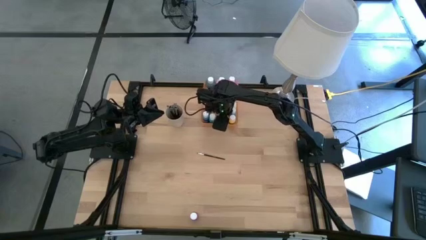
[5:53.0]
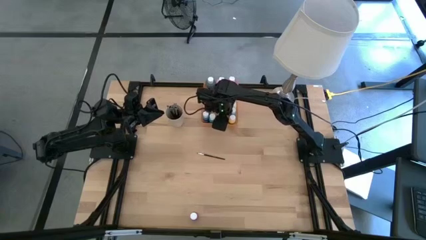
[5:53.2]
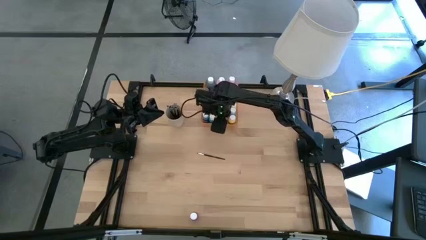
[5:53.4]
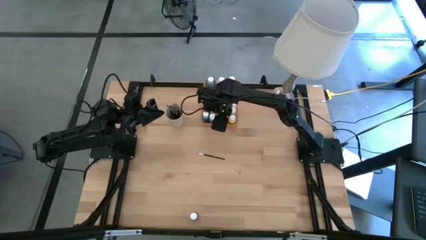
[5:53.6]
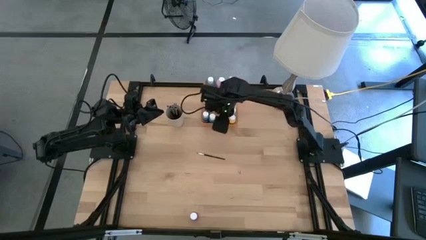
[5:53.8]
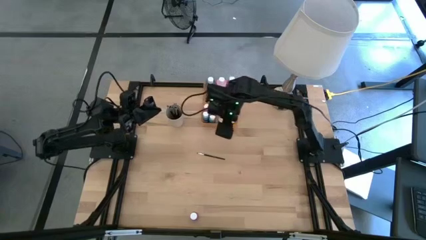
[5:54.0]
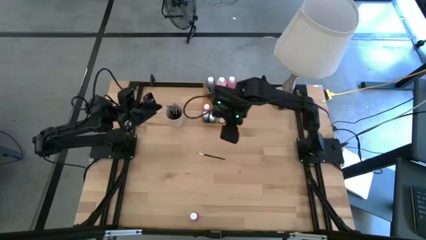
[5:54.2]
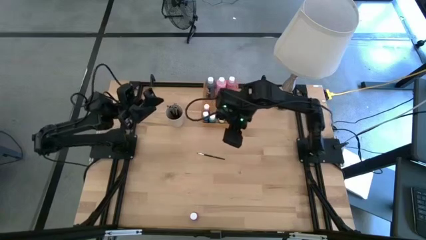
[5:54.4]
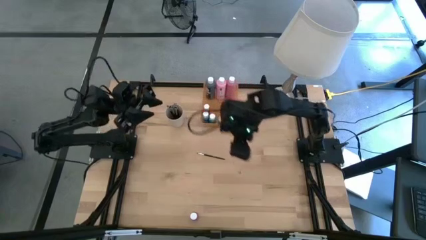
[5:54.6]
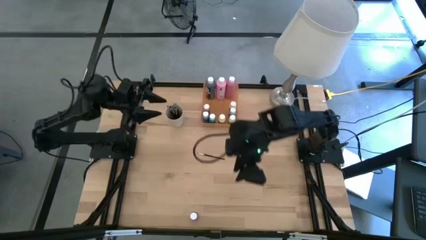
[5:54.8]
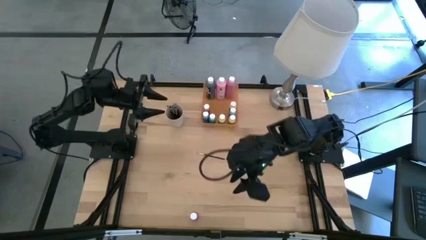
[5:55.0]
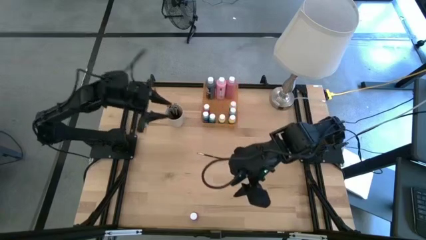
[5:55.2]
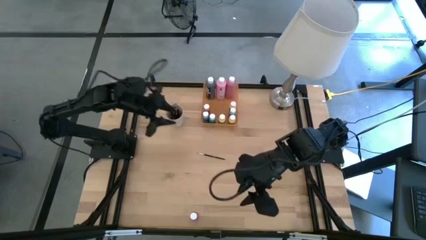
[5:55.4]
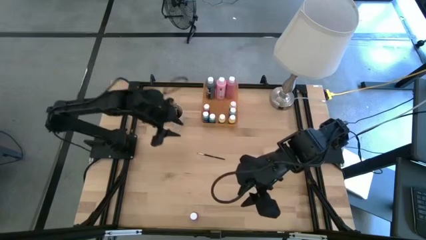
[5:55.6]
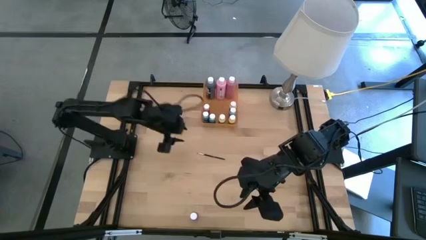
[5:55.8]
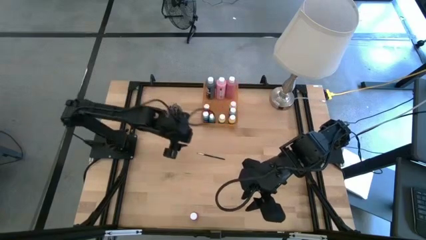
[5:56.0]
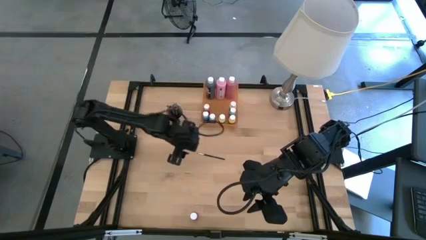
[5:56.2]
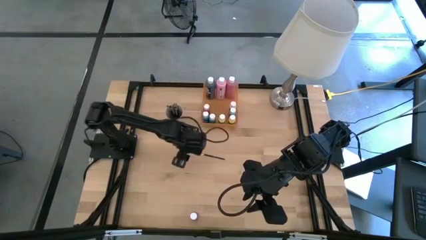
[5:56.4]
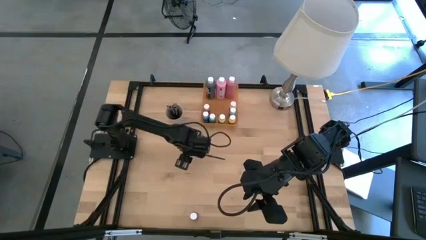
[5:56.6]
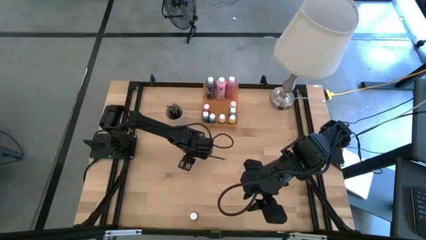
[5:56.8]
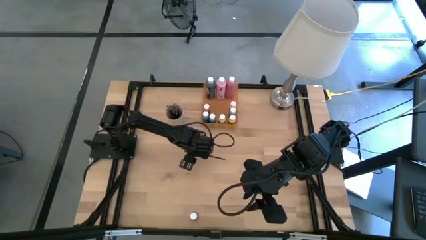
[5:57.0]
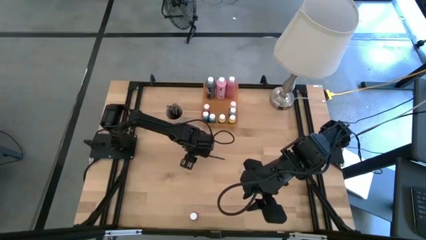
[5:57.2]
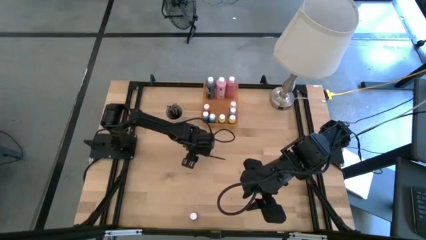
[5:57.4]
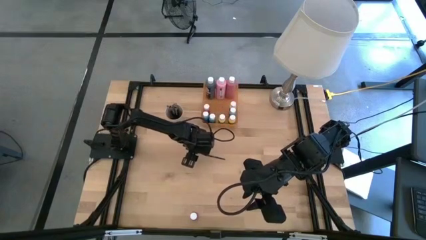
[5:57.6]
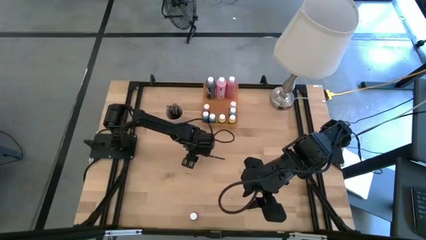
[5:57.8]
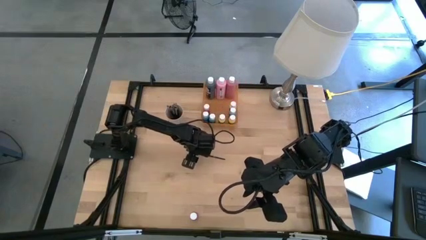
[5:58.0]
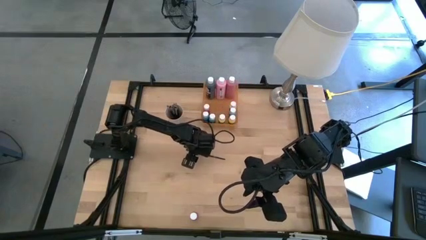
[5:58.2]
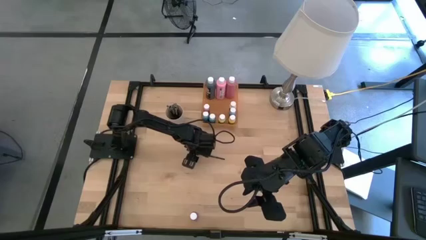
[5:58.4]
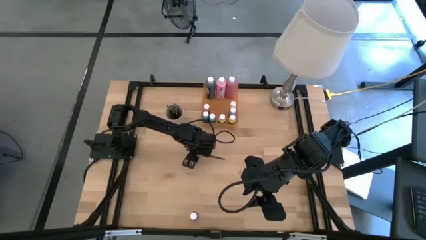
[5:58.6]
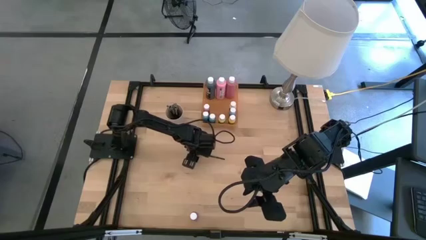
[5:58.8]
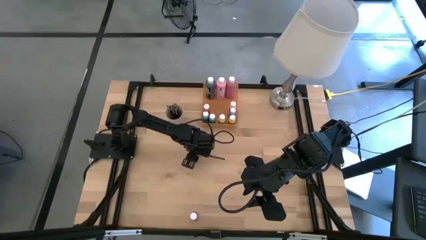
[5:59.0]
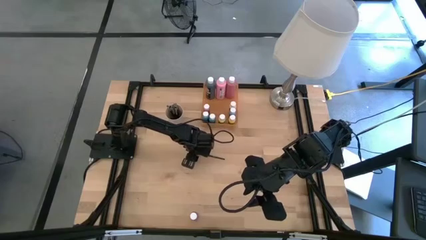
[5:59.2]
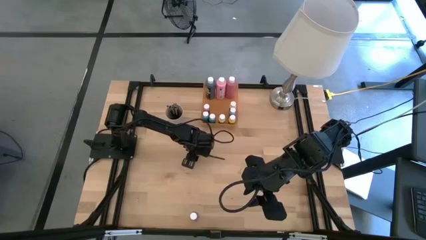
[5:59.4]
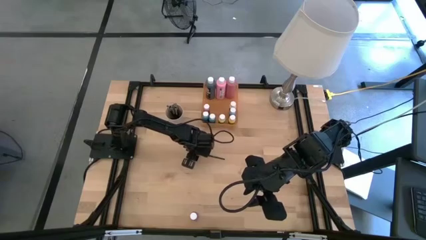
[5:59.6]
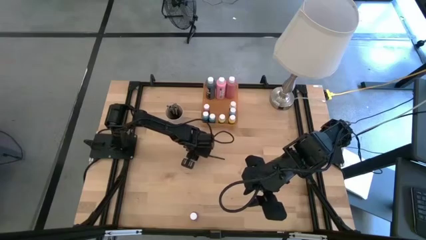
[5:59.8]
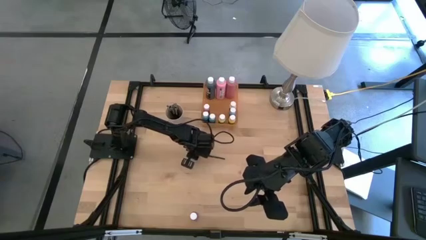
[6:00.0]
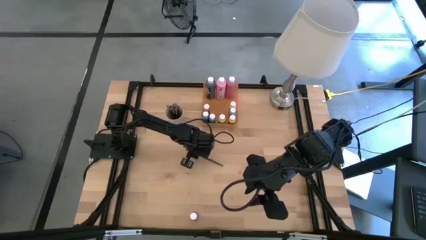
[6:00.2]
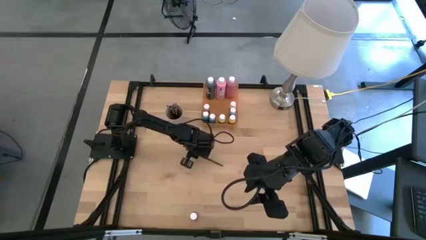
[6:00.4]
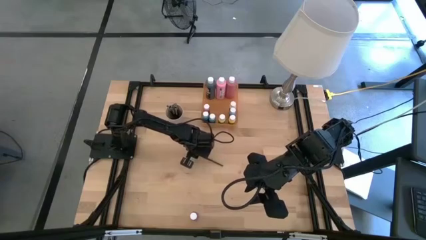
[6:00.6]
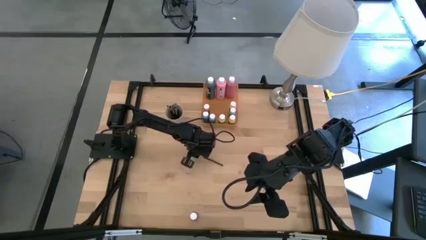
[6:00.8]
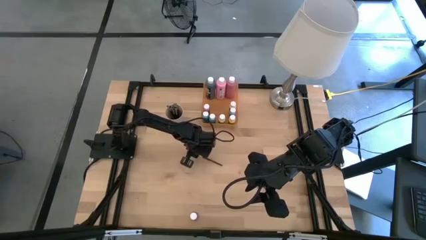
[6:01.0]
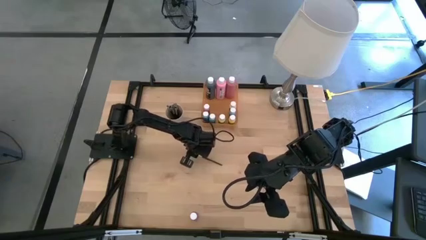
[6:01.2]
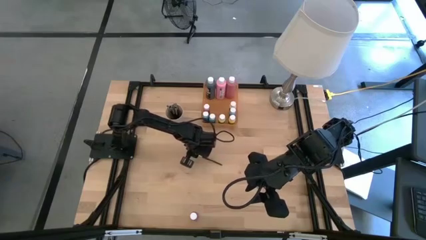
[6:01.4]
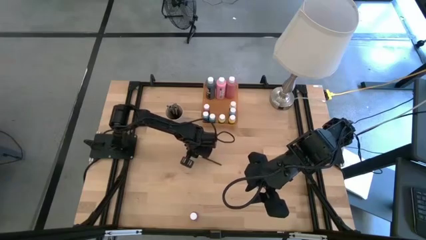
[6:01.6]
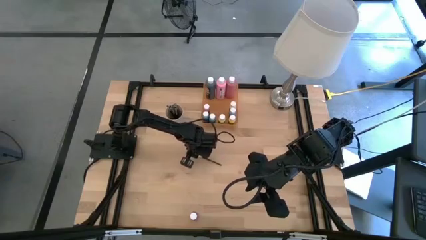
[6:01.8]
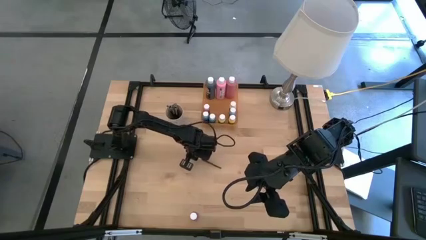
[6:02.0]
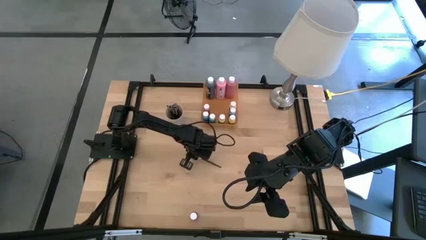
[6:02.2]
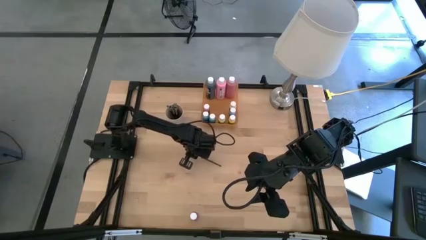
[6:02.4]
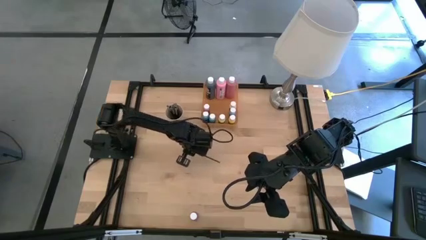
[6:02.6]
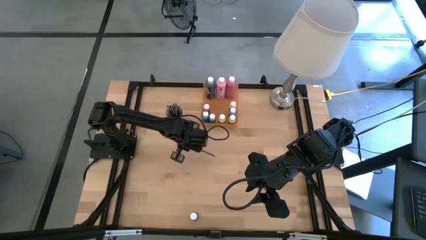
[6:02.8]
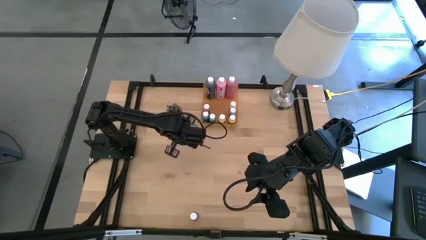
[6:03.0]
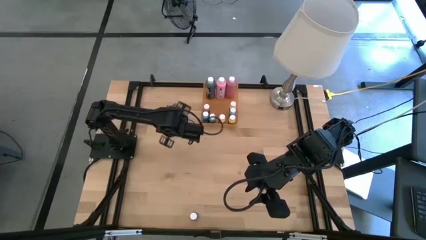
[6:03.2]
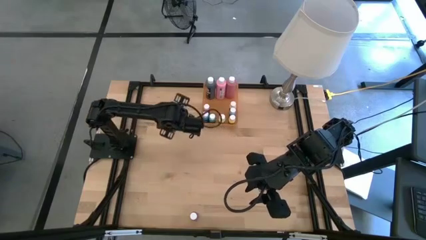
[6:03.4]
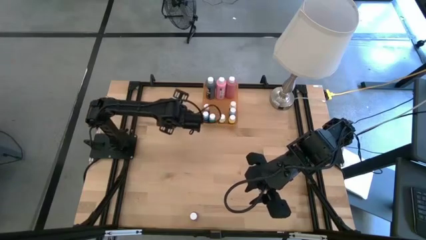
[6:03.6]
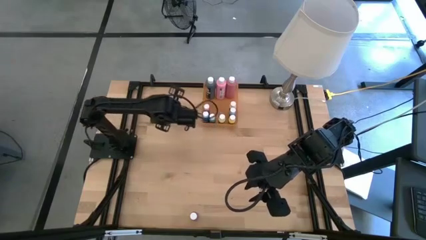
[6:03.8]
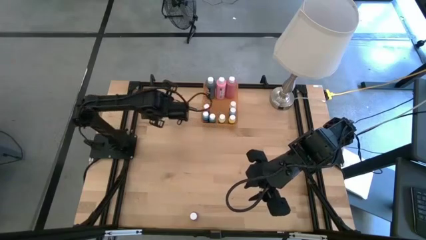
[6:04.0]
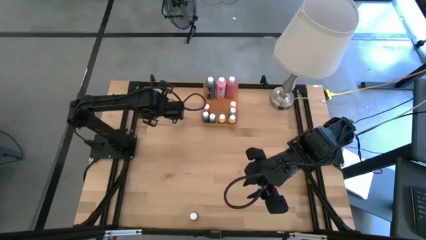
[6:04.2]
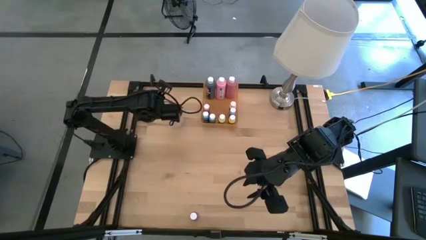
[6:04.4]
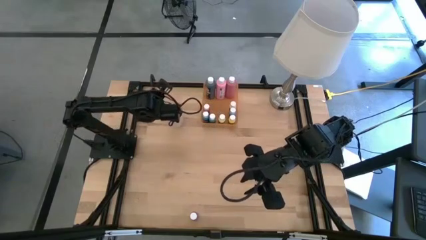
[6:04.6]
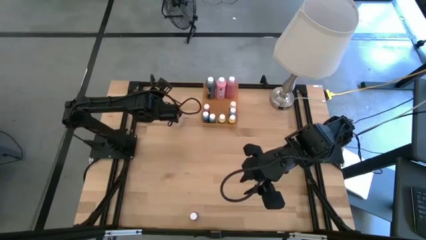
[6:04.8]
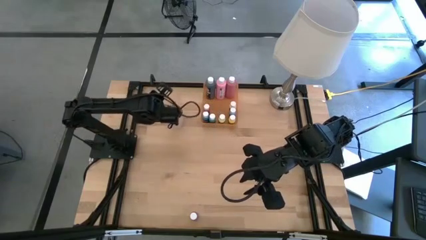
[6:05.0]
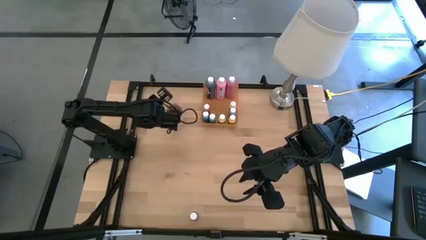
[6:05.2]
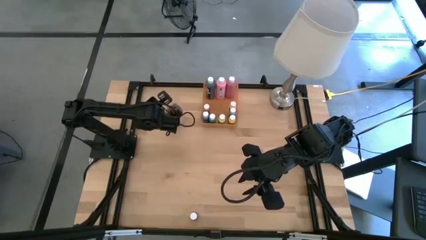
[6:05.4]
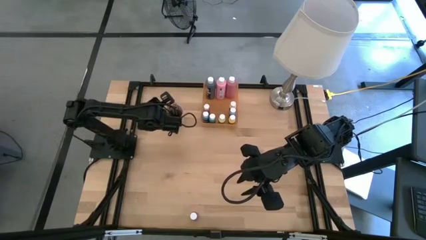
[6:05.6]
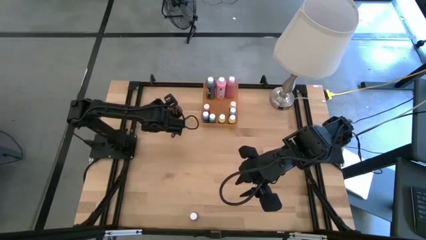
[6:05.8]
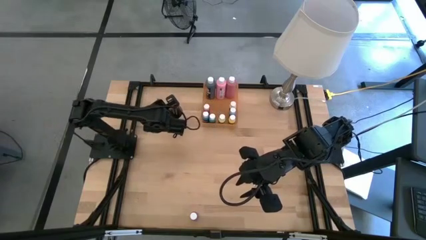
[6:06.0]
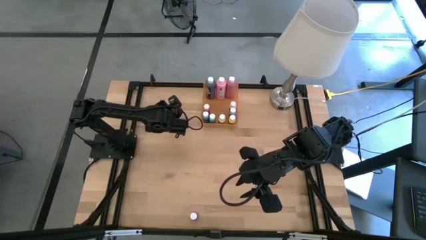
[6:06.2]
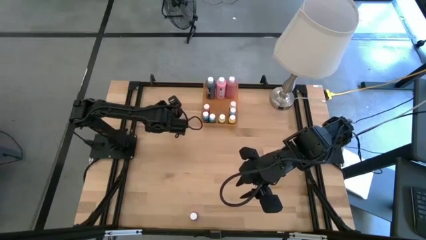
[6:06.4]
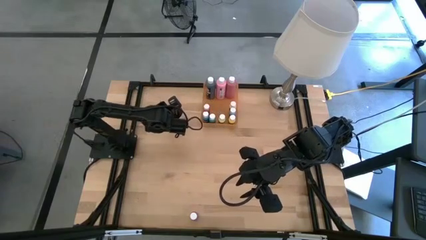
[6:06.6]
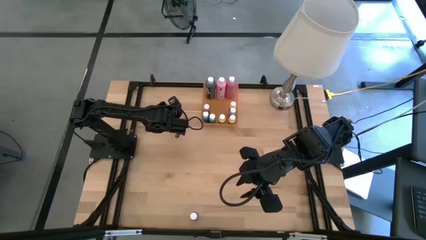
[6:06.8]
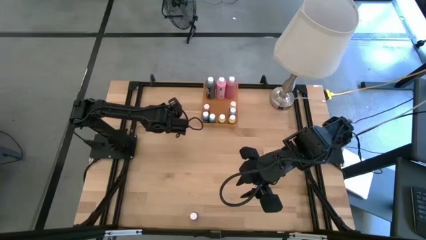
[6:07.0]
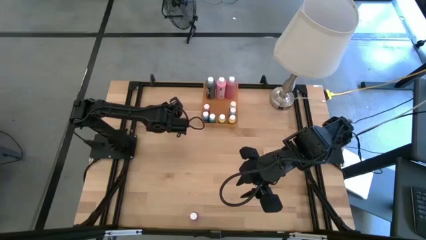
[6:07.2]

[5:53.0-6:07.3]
Task: Pick & Place Paint Supplies
Put the black paint brush into the white cup

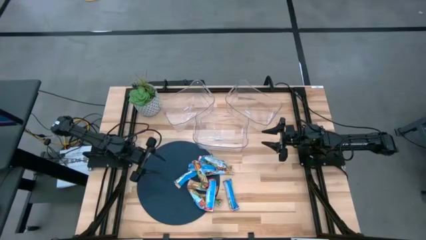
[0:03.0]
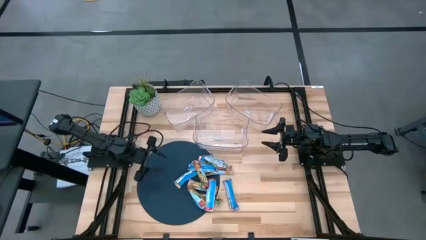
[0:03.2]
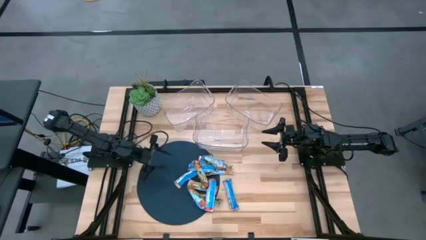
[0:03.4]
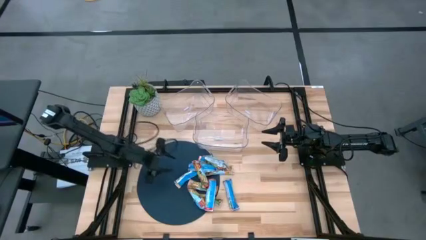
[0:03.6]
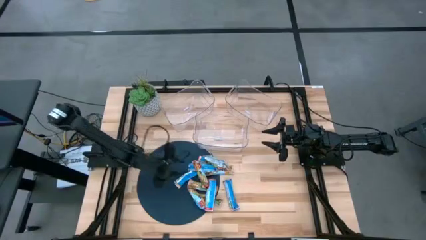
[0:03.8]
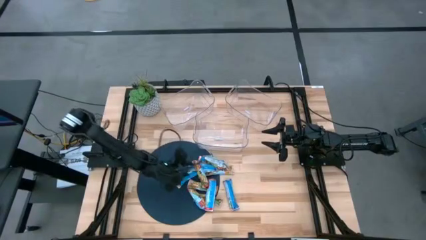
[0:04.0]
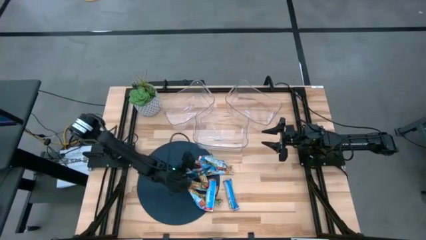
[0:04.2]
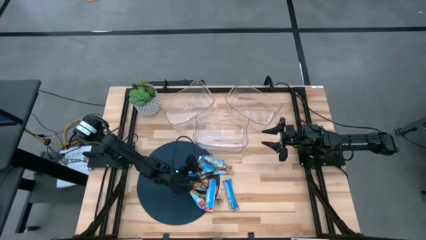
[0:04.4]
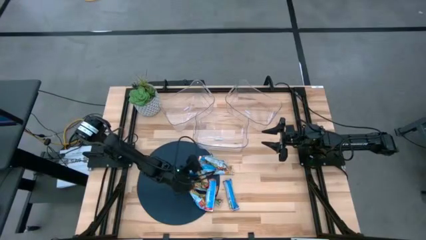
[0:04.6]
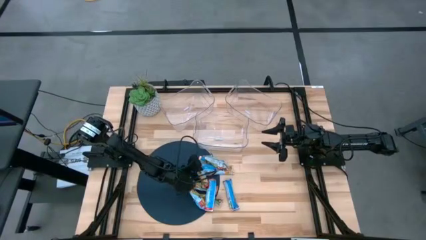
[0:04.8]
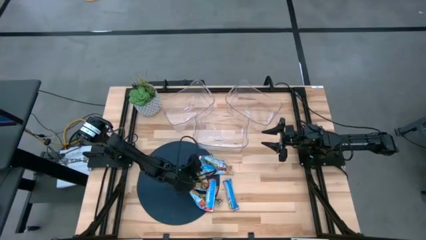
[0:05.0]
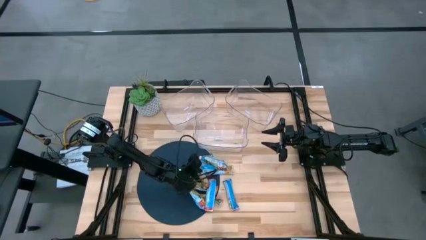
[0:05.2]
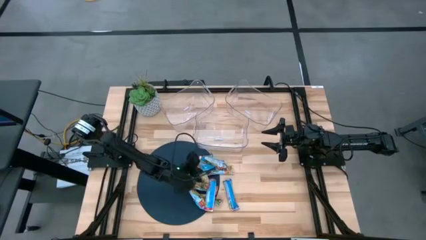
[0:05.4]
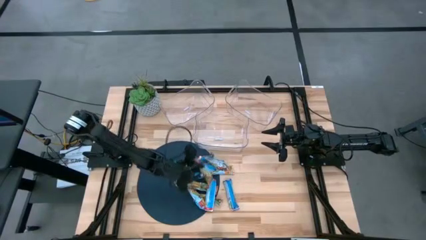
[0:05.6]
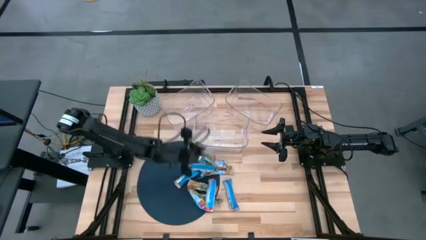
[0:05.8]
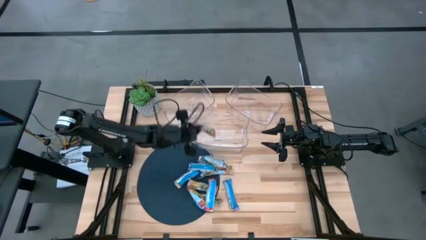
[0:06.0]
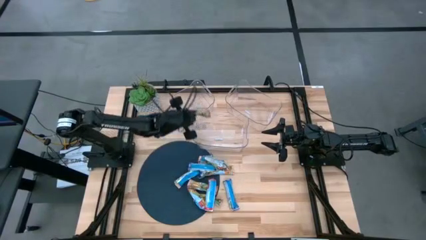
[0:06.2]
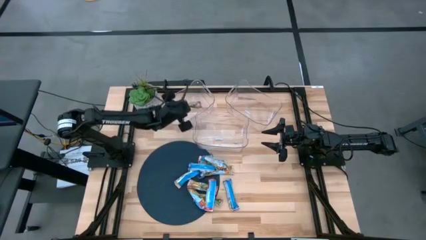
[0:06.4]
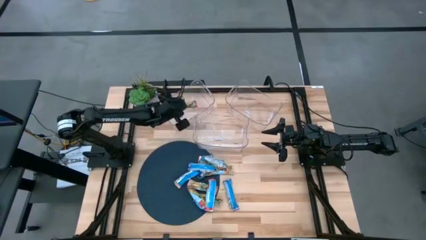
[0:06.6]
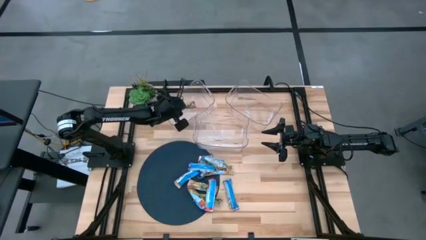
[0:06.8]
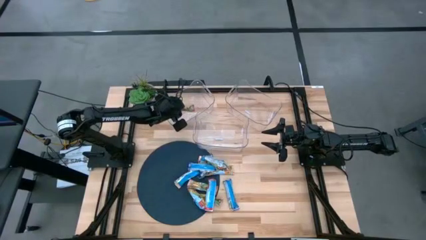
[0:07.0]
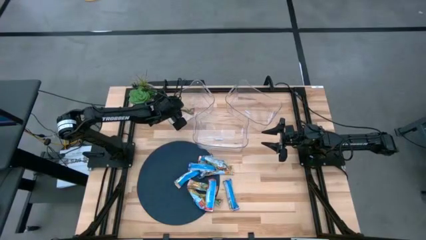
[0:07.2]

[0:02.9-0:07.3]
Task: Pick and place Granola Bars by type
Put the red granola bar into the left transparent bin
